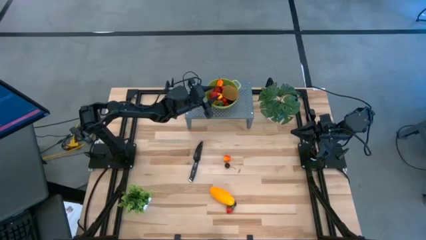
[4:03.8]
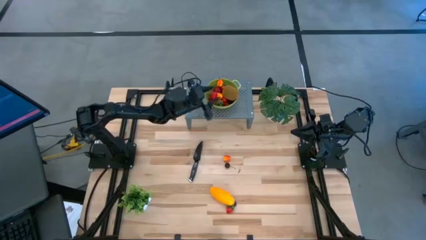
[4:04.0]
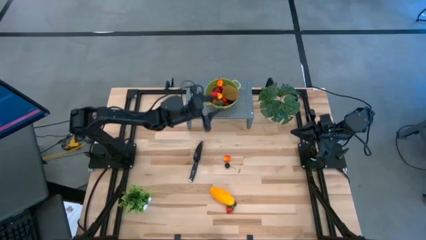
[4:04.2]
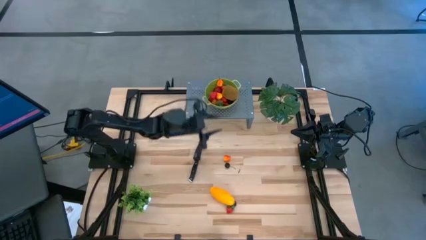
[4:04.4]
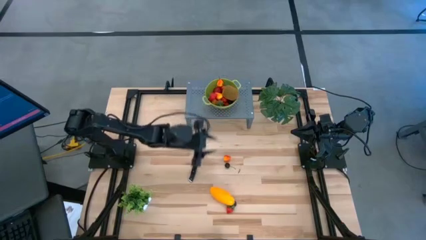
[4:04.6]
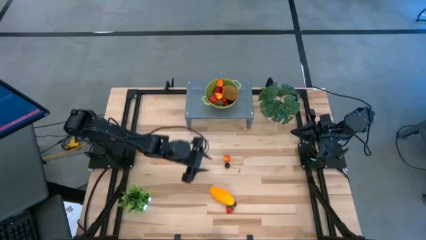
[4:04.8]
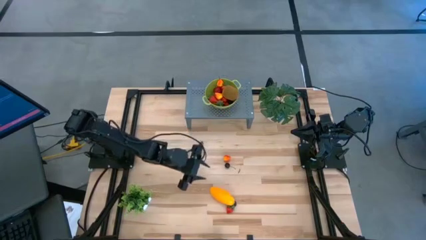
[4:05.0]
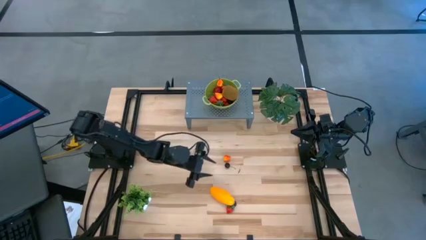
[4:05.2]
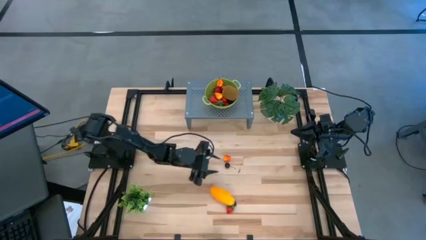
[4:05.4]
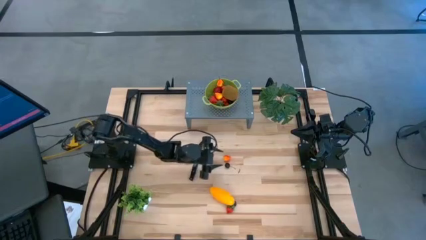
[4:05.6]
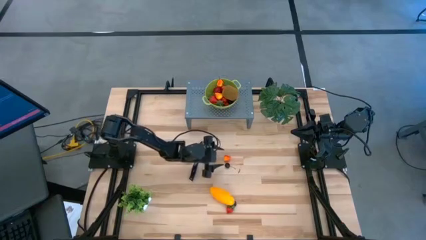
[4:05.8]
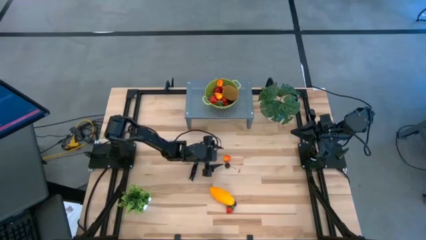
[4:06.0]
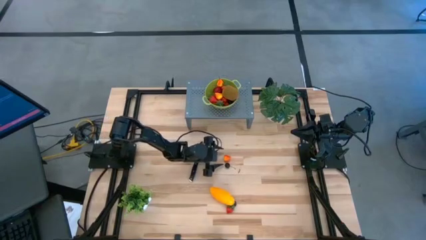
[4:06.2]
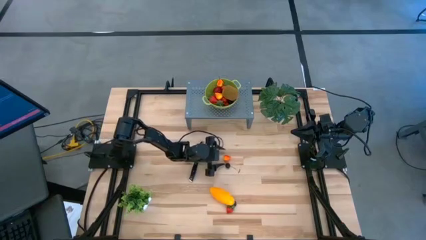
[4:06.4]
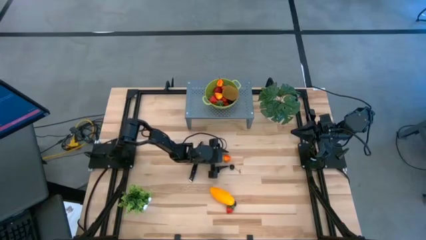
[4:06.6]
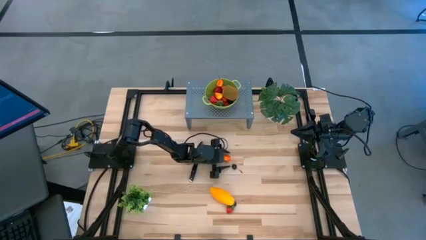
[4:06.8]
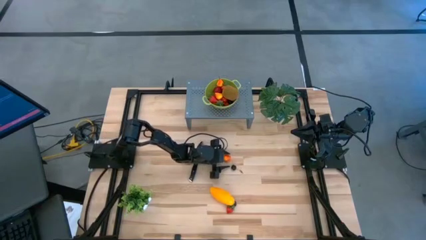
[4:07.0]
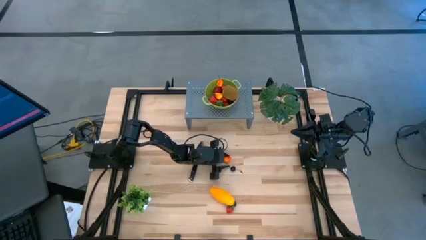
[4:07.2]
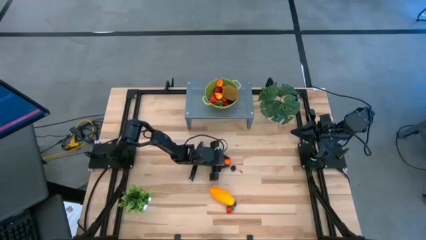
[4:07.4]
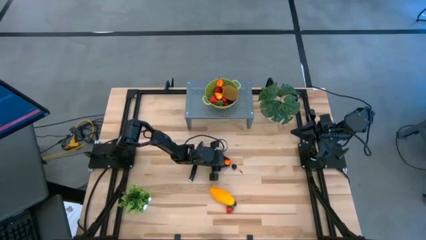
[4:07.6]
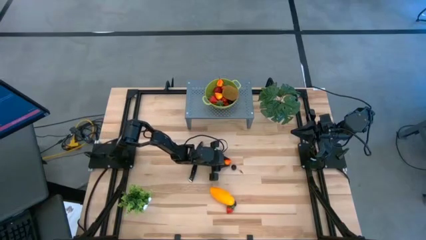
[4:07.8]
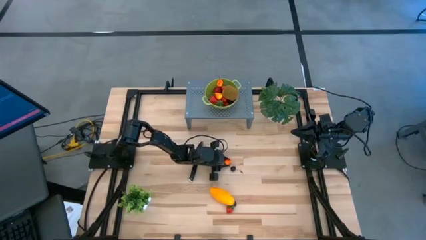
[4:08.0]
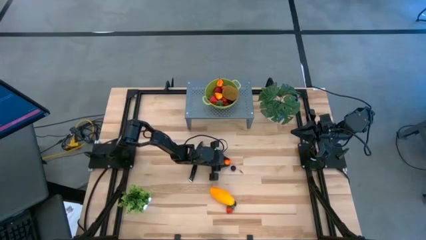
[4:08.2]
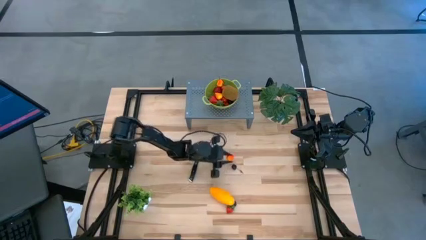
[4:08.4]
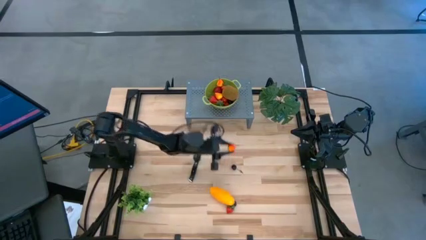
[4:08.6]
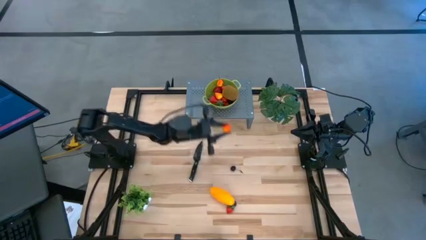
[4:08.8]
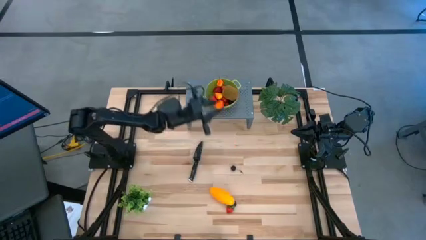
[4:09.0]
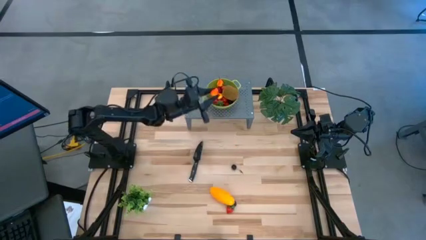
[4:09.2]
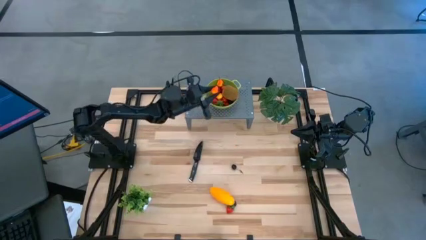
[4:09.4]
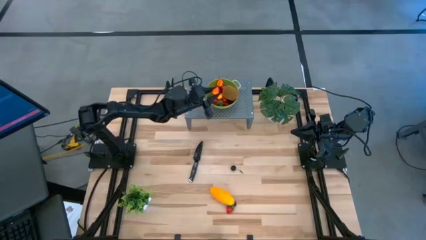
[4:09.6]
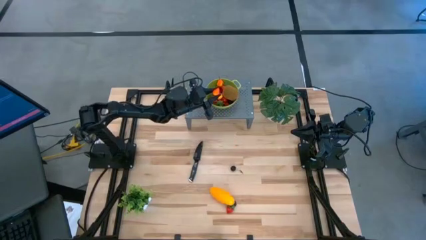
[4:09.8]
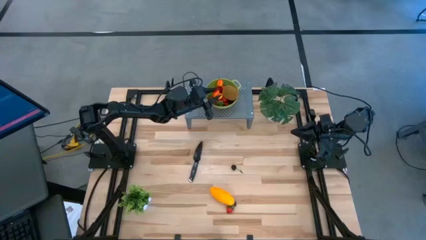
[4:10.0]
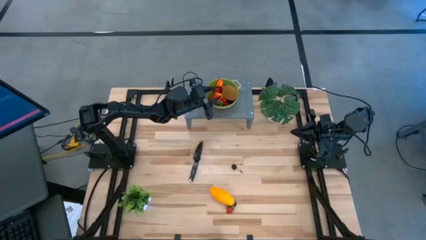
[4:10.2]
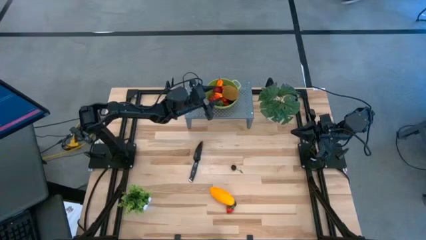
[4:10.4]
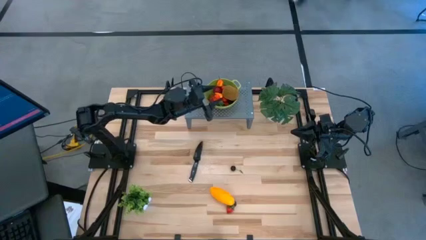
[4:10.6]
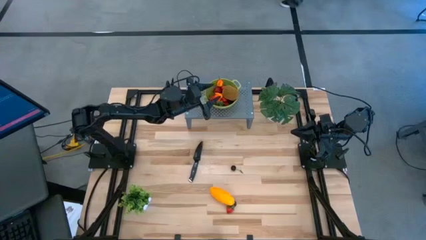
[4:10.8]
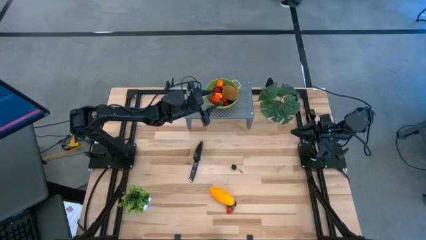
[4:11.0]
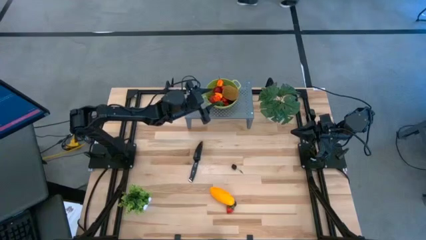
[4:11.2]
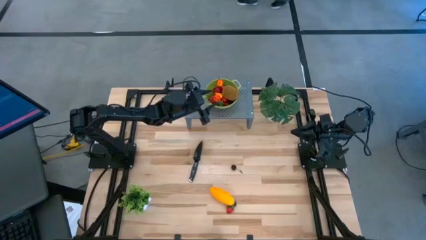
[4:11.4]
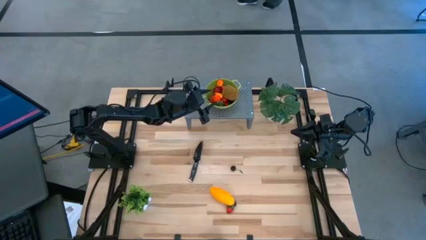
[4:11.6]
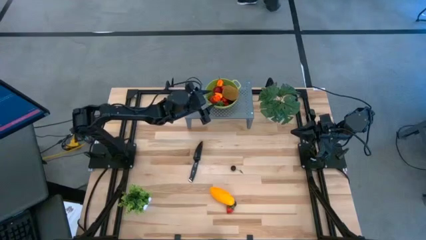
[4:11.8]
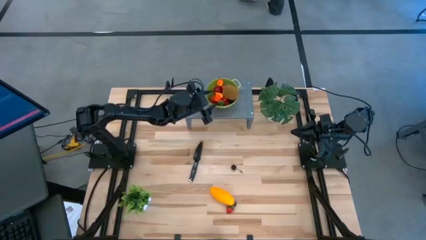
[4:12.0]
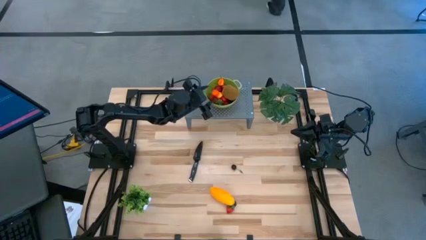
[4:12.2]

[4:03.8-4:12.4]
Task: Pick & Place Fruit
Put the peach into the green strainer bowl on the shelf

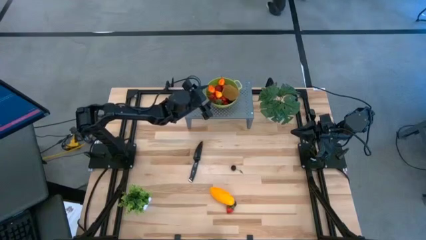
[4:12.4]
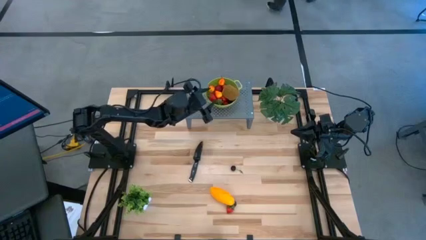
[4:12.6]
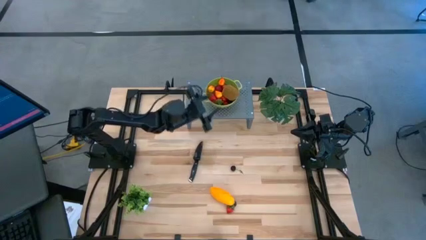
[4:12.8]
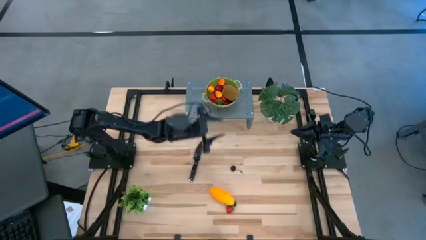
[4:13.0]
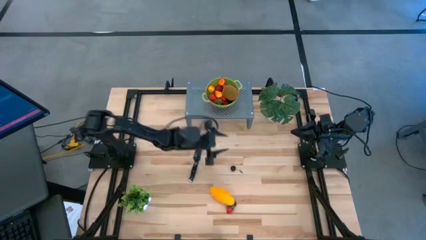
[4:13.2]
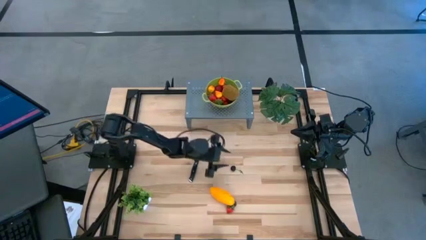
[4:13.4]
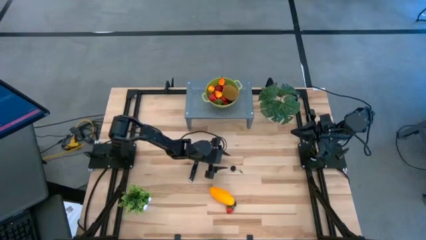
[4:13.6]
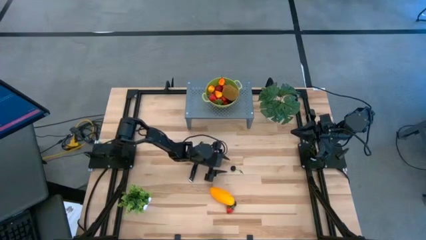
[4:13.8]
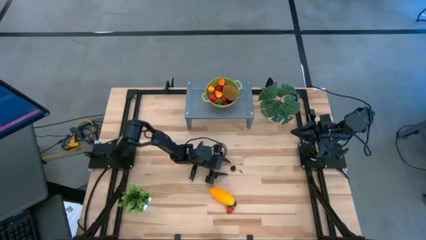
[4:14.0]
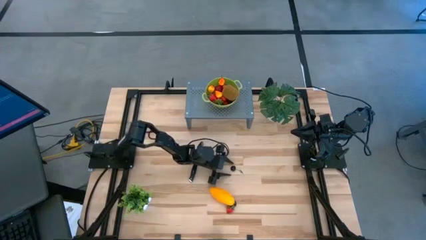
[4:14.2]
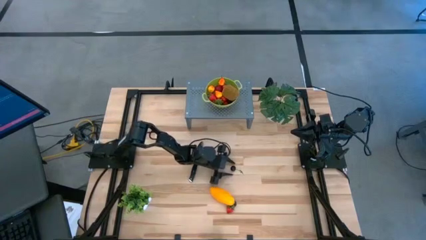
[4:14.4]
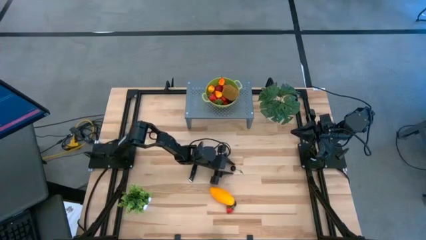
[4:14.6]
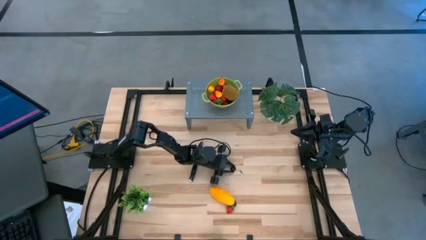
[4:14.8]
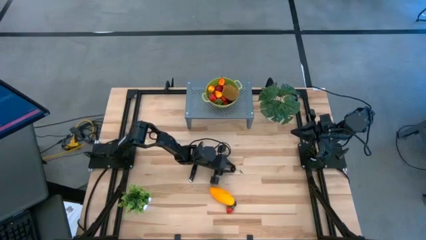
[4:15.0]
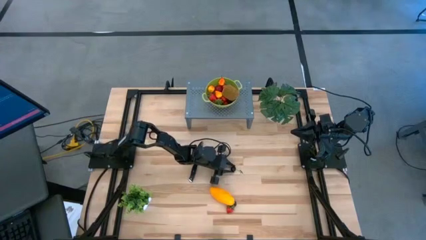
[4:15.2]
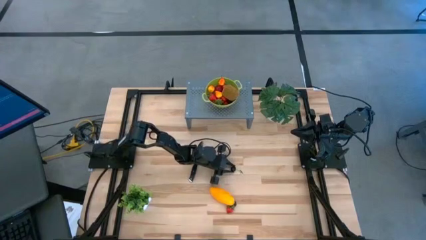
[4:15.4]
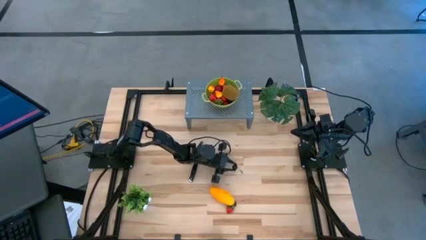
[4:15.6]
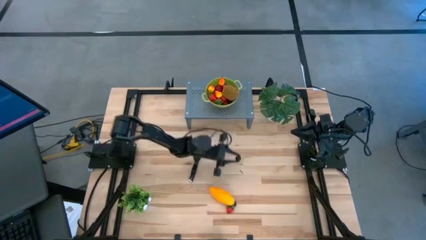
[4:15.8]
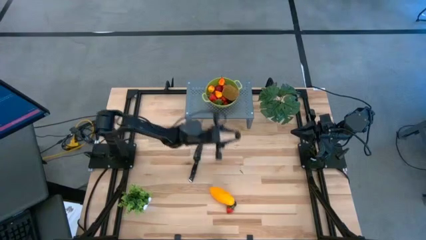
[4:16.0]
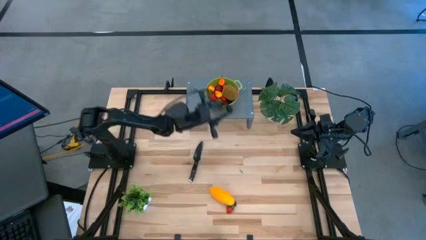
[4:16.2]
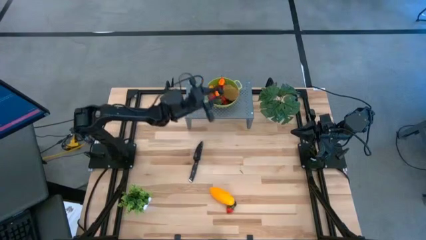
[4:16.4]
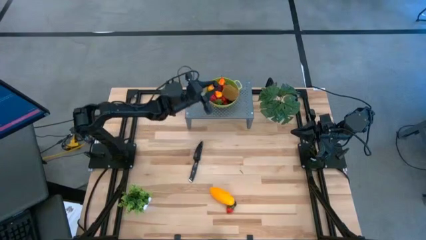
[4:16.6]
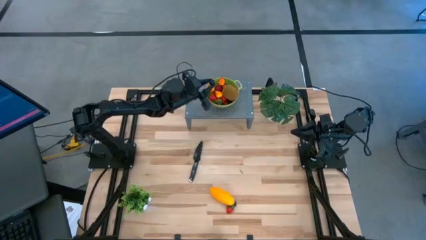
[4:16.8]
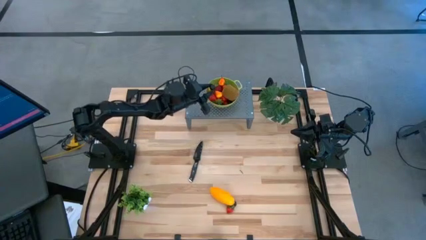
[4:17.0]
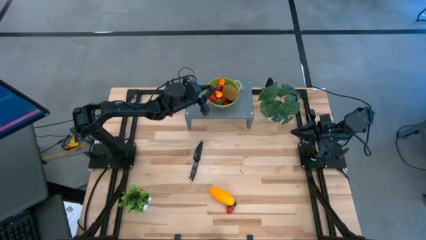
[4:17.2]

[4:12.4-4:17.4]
Put the black cherry into the green strainer bowl on the shelf

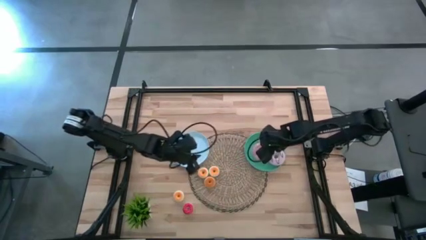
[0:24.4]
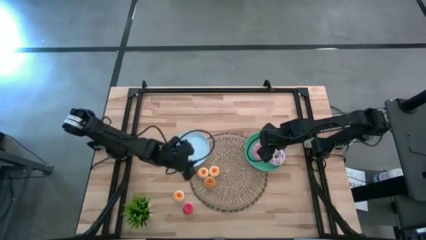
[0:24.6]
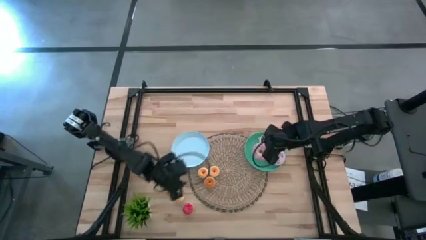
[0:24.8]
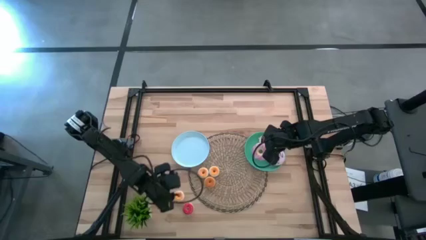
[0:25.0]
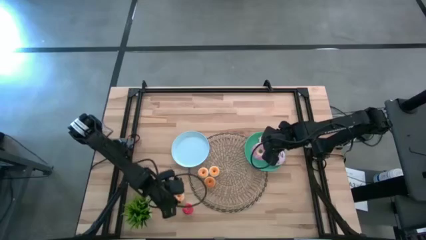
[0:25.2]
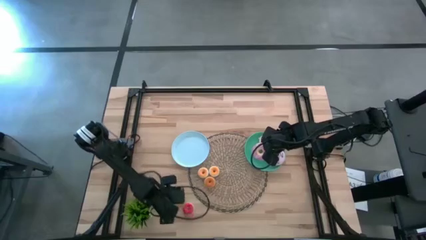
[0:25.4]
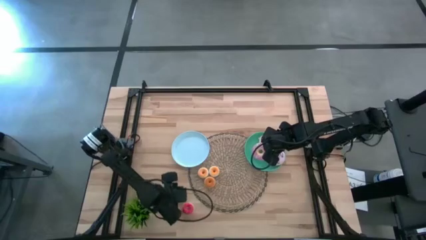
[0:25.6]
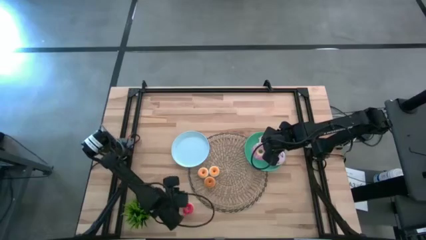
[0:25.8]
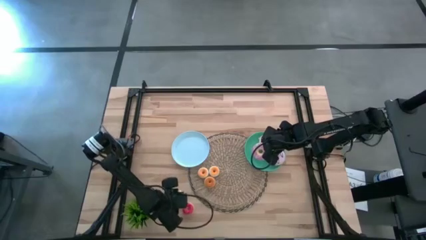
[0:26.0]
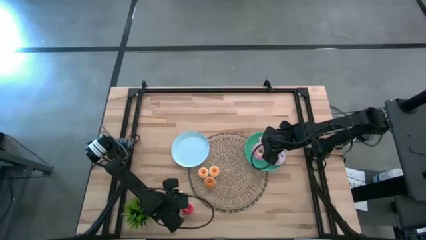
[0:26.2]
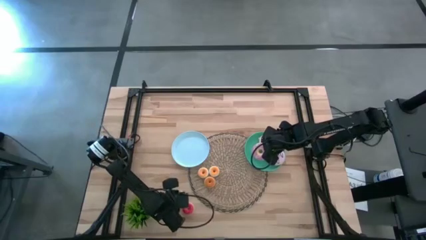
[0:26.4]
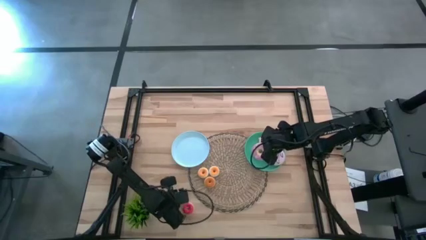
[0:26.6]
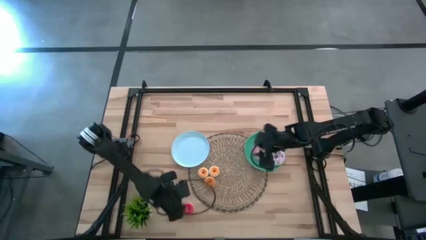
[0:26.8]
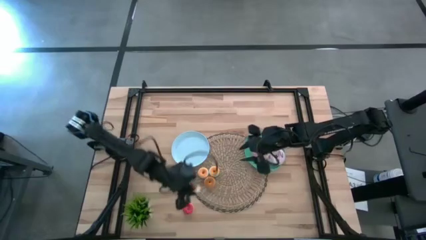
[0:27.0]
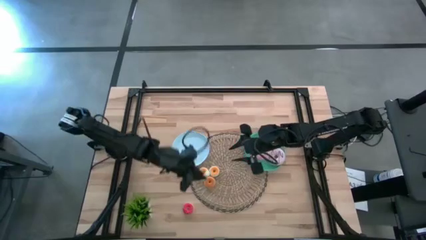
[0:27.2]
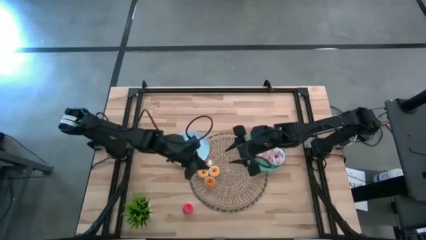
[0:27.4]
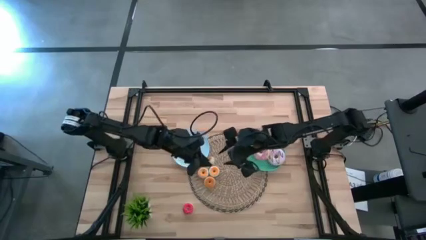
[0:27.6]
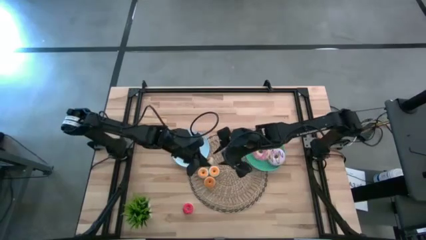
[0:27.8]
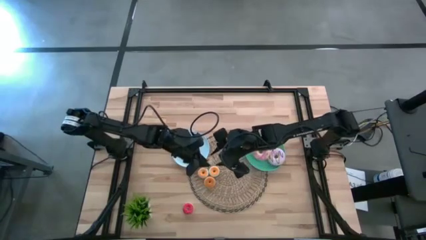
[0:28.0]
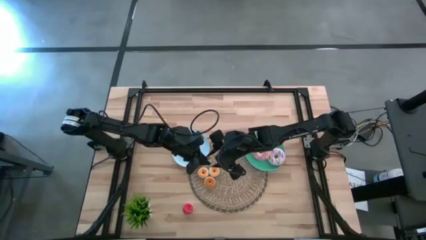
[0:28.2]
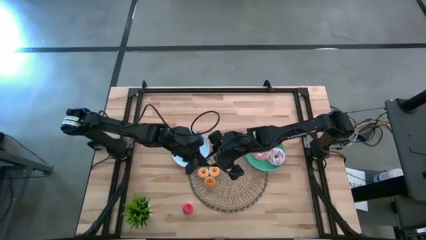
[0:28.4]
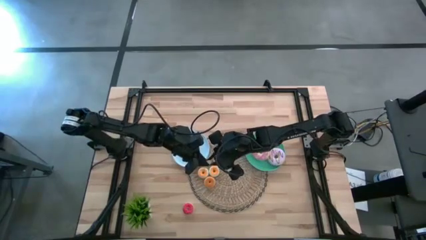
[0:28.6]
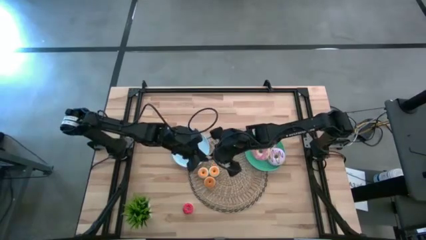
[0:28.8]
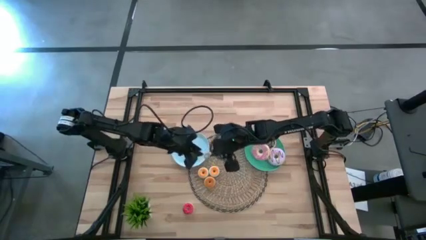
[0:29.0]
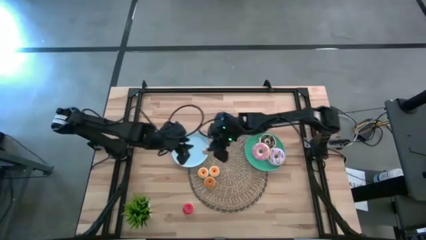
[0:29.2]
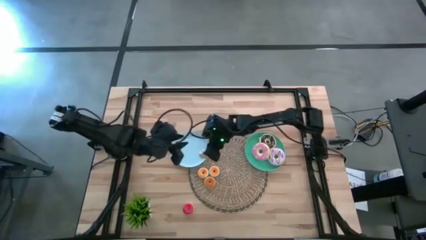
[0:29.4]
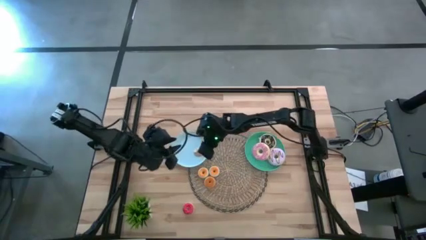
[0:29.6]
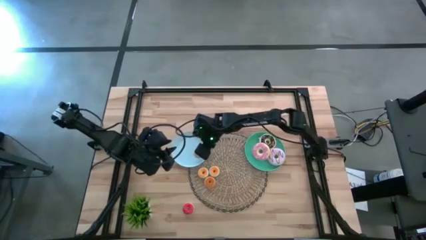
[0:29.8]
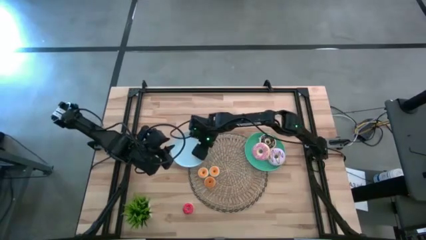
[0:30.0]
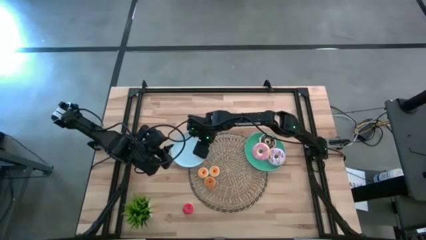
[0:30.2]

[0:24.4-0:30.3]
Task: Pick & Place donuts
Put the small white donut on the blue plate
